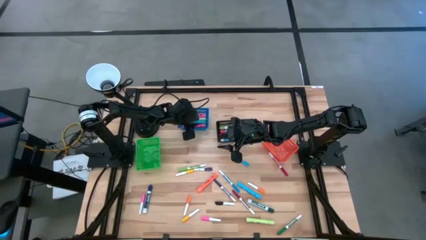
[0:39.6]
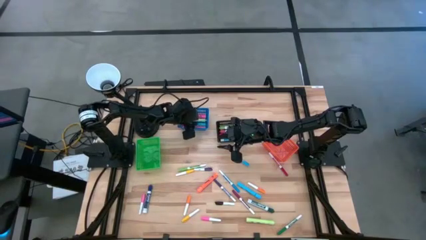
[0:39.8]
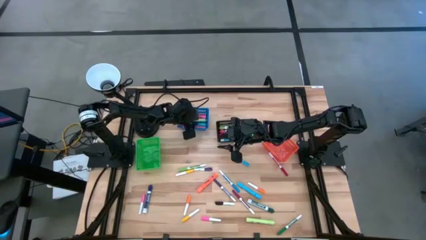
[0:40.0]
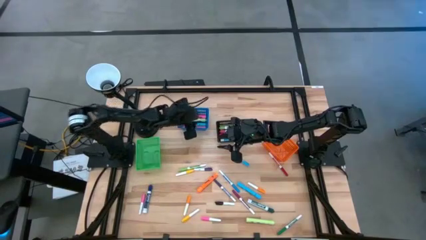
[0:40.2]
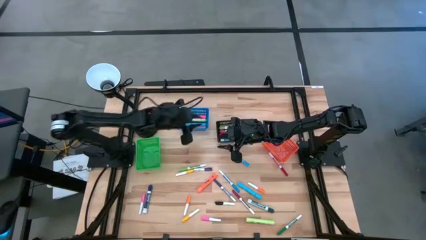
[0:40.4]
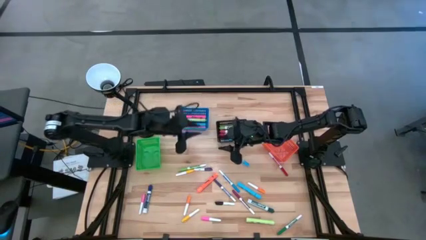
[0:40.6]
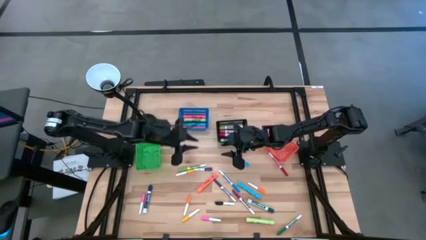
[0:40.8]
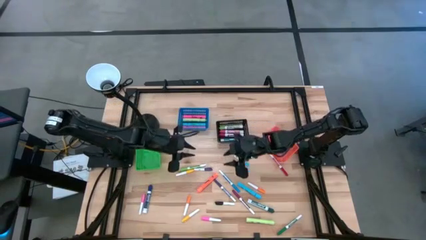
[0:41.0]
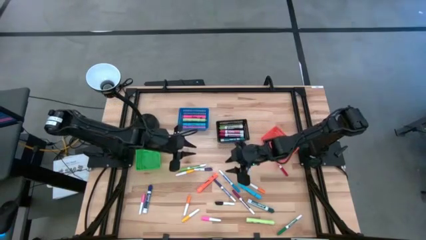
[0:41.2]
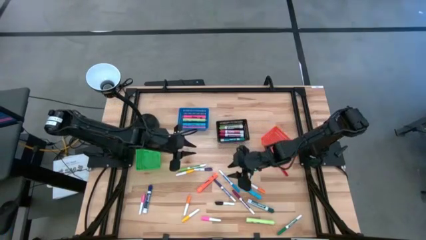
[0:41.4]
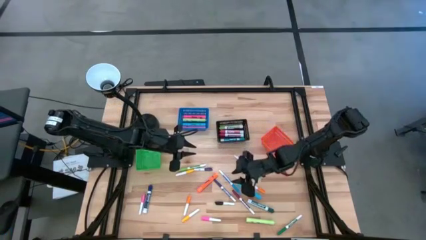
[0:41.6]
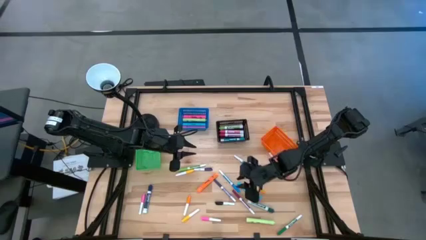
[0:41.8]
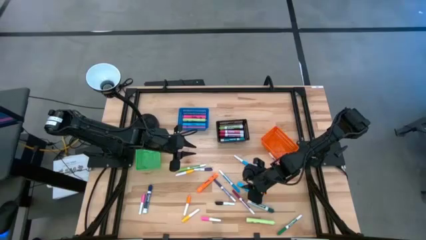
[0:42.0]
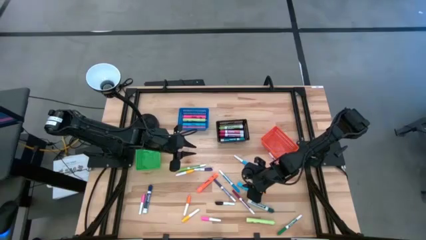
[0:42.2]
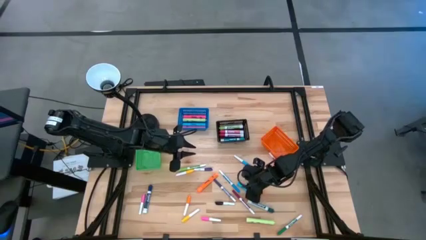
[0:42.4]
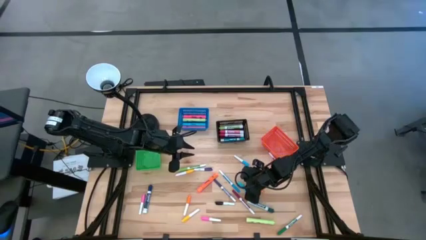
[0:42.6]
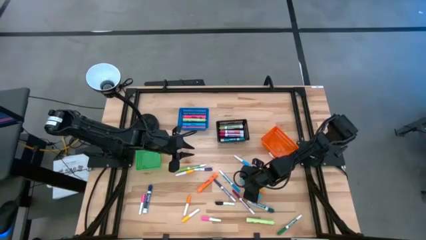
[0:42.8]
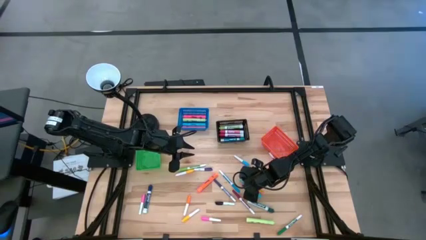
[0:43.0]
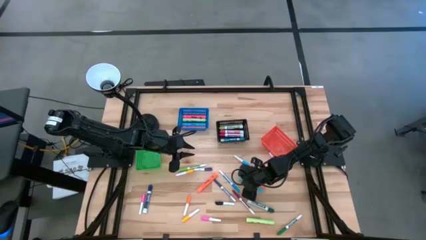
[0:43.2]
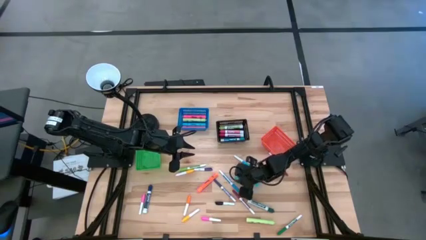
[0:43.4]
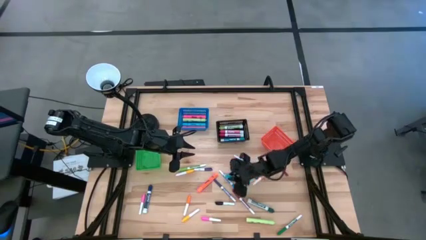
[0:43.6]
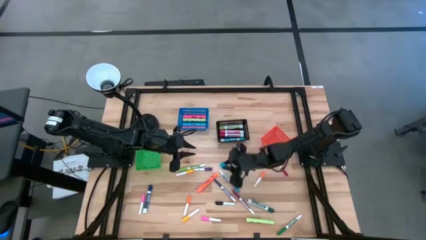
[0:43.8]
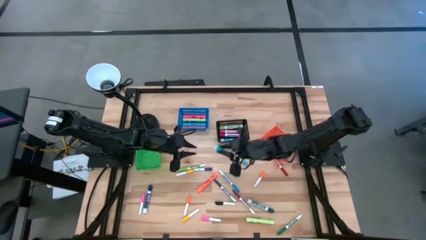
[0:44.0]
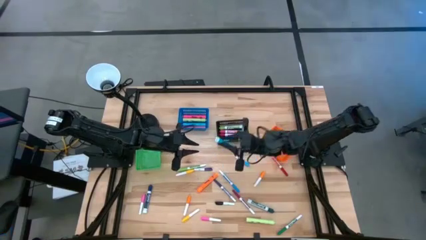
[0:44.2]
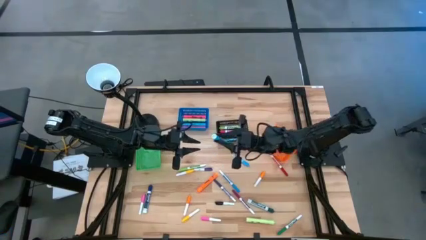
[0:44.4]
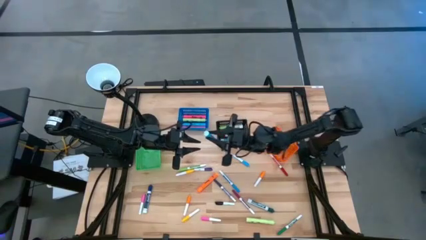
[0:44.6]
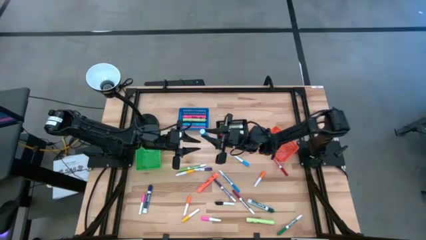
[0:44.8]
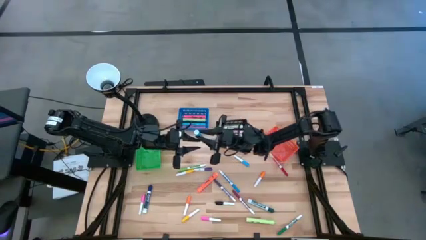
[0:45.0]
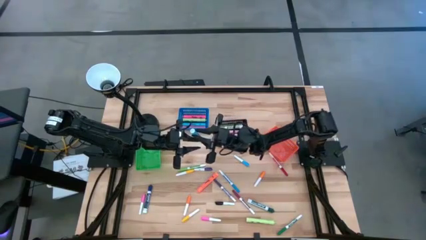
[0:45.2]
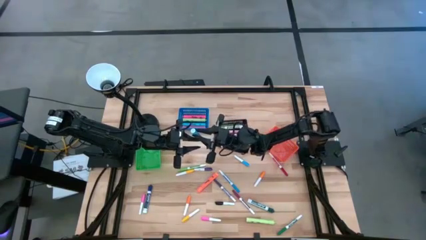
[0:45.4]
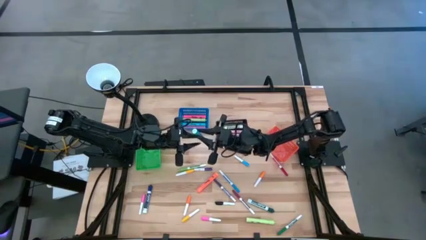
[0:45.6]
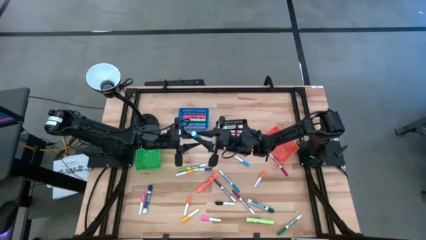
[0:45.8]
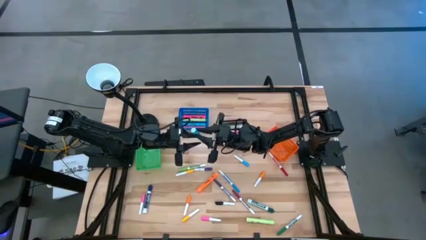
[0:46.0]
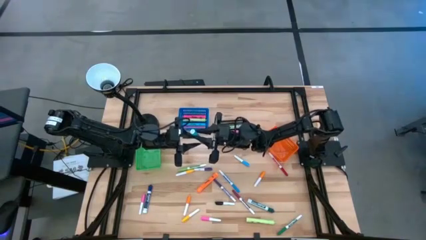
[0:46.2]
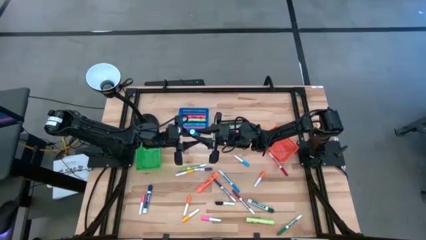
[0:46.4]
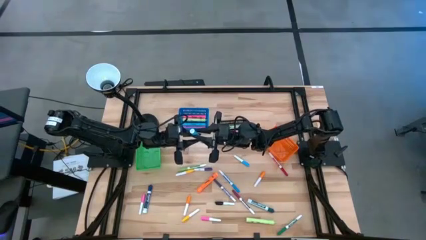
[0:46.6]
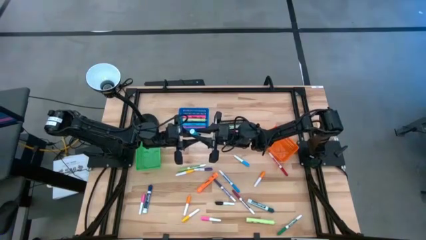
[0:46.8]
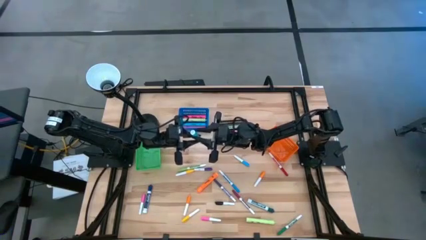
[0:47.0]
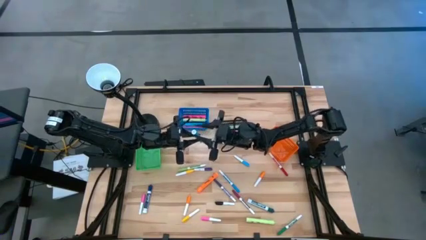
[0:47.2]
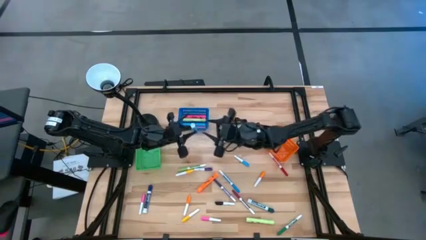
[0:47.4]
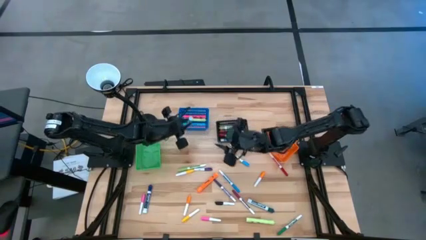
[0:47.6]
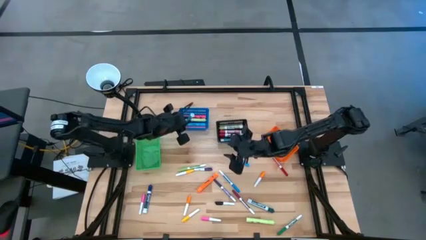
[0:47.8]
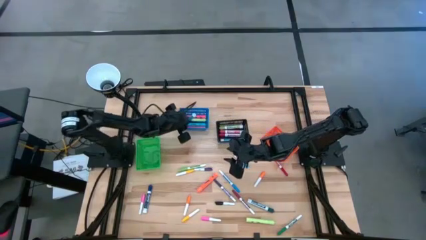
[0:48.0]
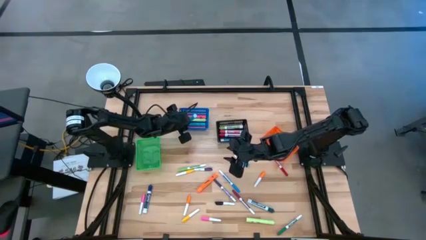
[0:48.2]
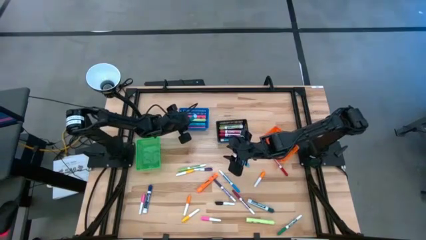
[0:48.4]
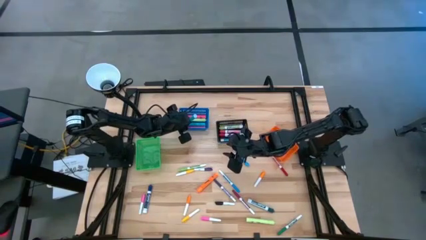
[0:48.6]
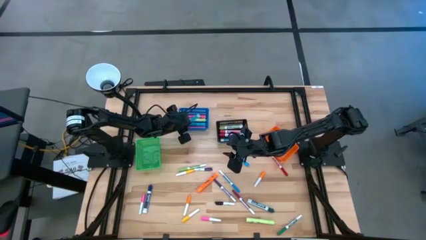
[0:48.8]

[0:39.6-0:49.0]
Task: Pick & Place Markers
Put the light blue highlighter pen into the blue basket

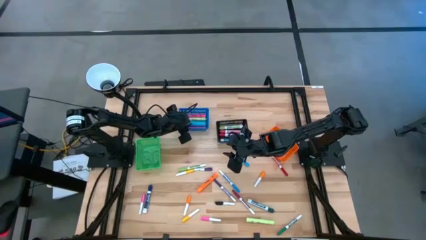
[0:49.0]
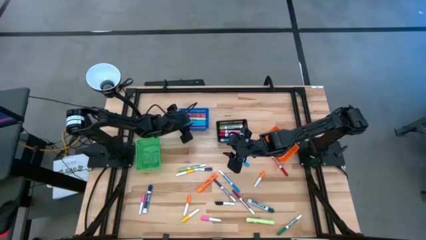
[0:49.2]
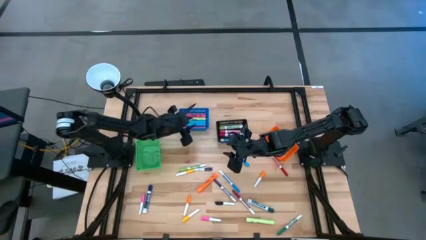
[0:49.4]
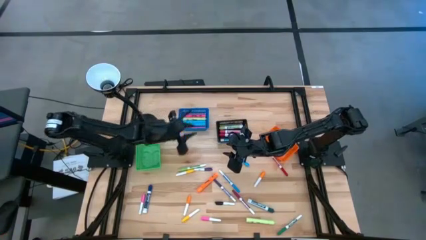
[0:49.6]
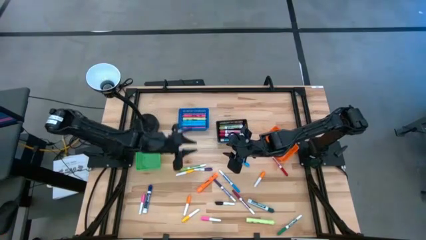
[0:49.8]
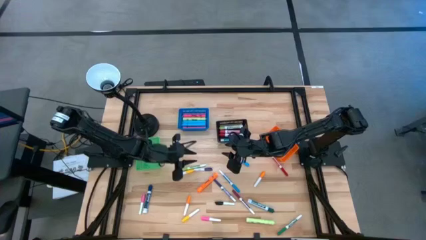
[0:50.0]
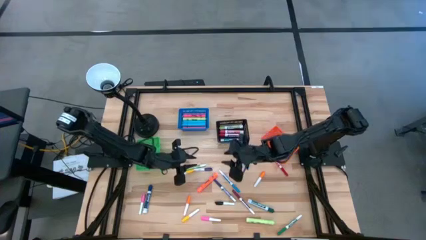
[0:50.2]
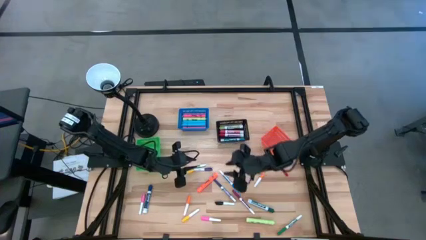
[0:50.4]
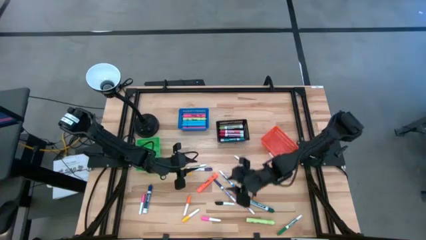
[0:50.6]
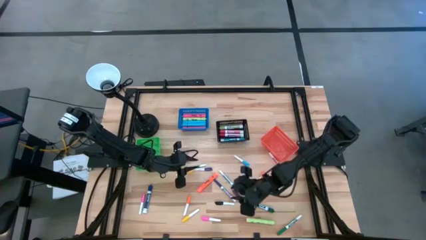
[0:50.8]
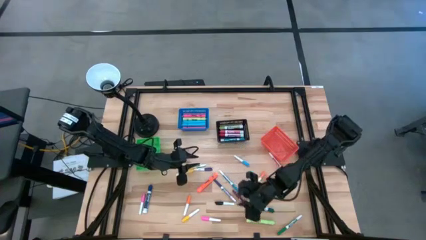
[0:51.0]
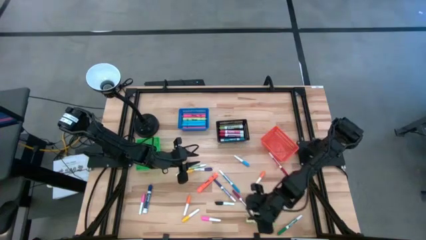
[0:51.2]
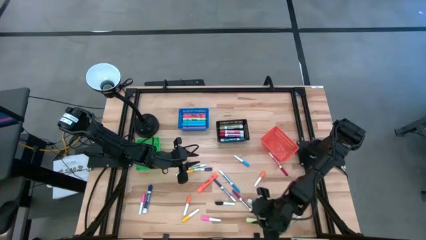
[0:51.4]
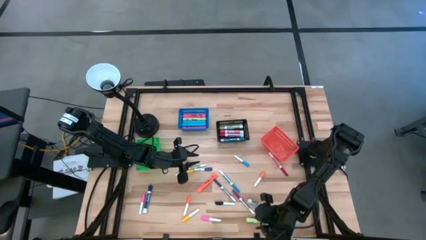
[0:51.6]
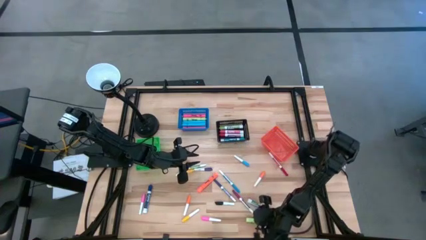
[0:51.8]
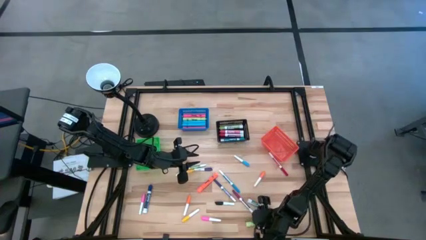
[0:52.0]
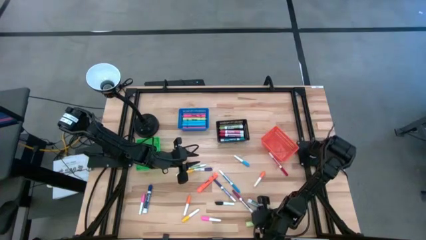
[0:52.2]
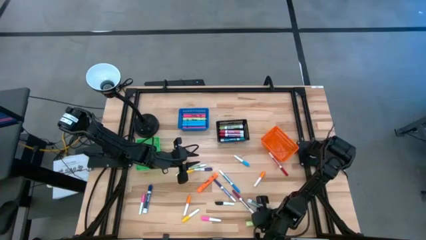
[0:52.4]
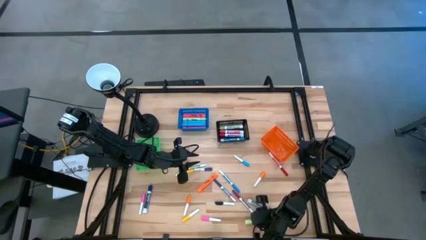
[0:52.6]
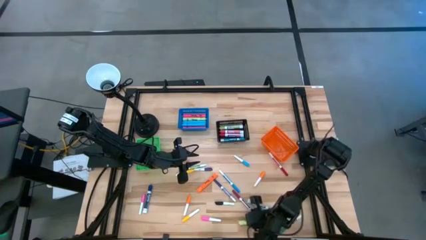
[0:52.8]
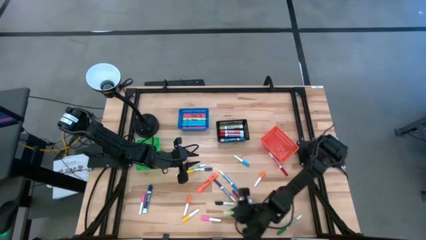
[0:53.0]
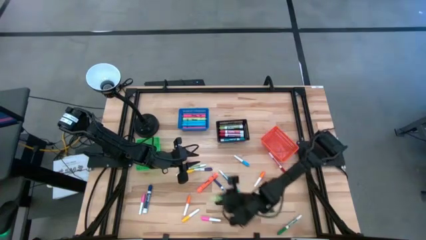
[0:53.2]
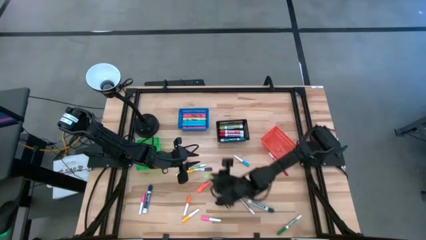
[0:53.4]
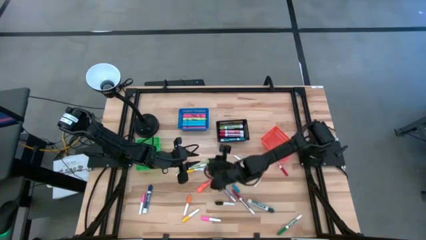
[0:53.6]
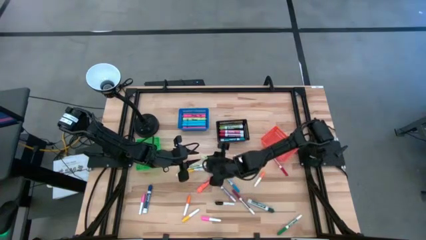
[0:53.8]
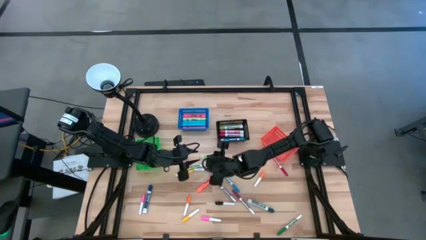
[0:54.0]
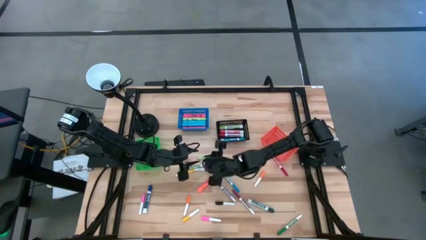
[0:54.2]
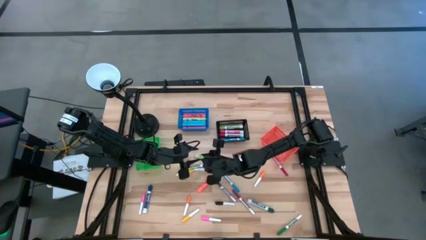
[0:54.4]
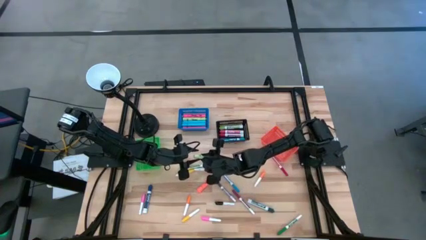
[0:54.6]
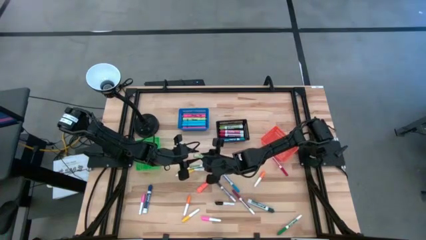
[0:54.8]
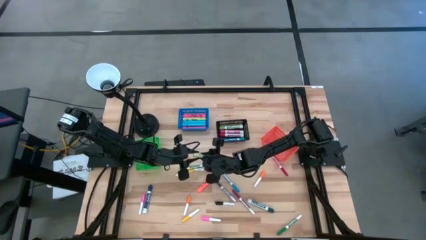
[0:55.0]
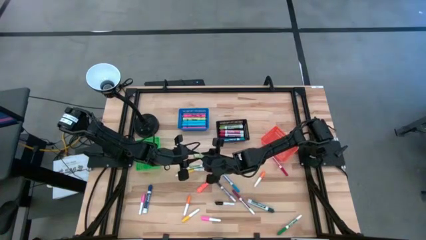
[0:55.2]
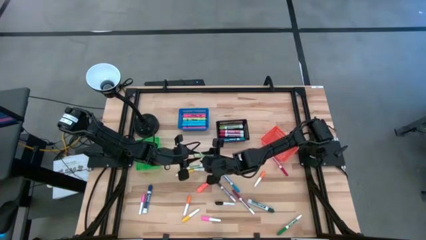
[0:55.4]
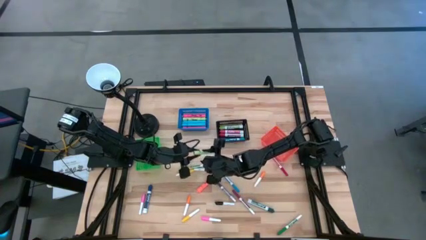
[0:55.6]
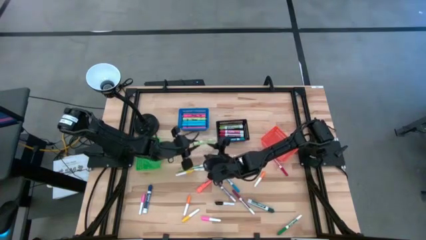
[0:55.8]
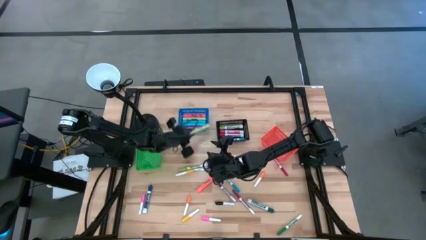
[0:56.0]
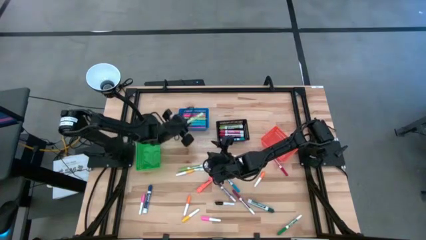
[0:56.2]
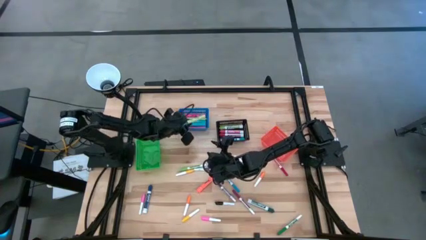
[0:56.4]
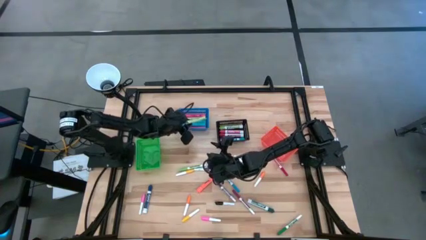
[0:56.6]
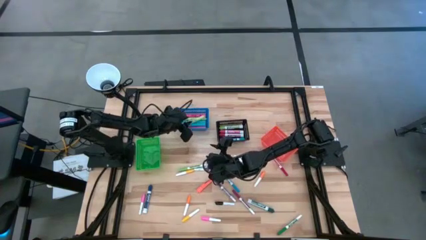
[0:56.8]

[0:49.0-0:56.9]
Put the light green highlighter pen into the blue basket

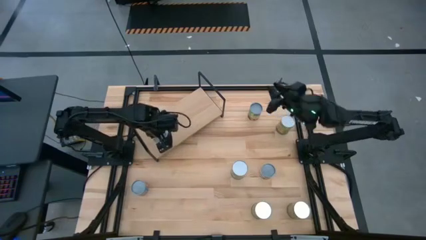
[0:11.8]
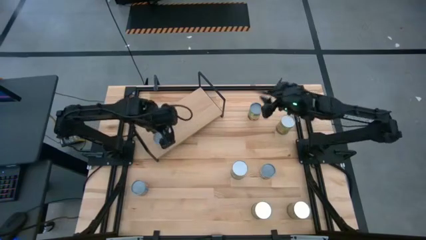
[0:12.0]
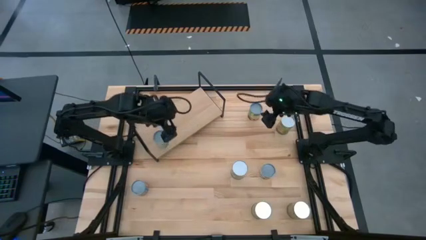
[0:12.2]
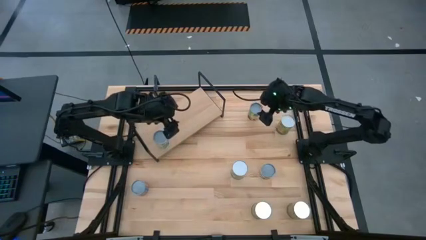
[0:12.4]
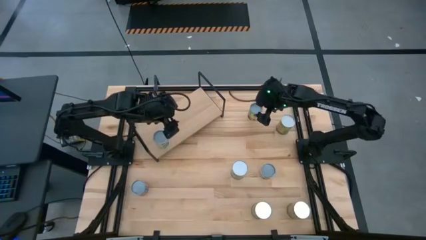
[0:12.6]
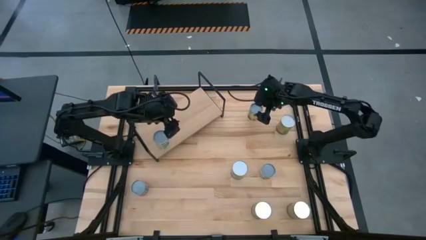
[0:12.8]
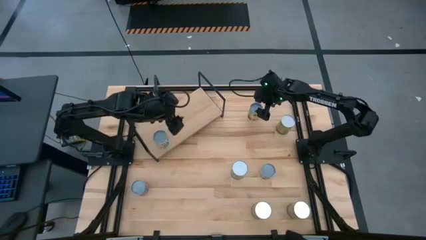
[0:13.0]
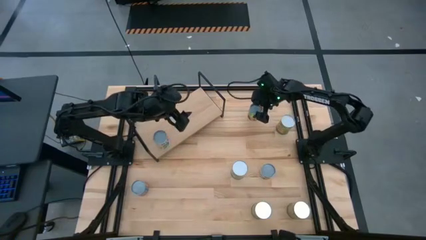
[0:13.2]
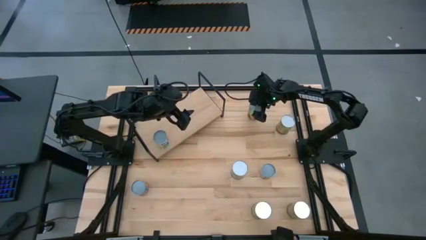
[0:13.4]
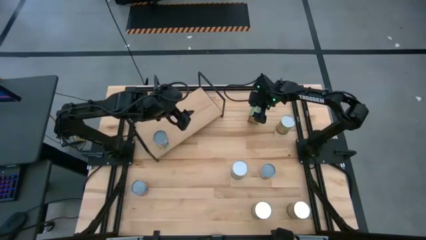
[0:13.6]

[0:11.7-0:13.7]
Task: Pick and place cans onto a shelf
Put the canned spaghetti sauce on the shelf
